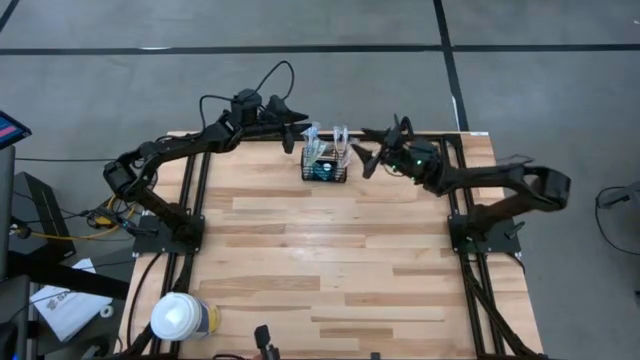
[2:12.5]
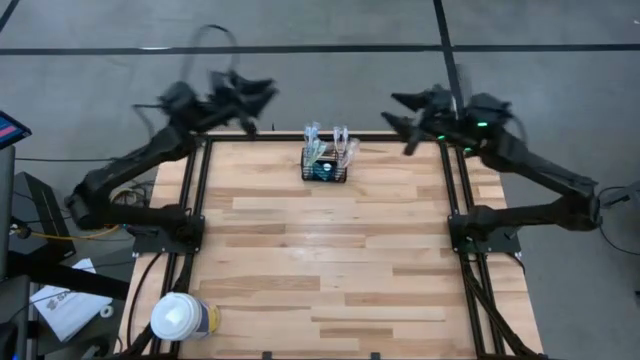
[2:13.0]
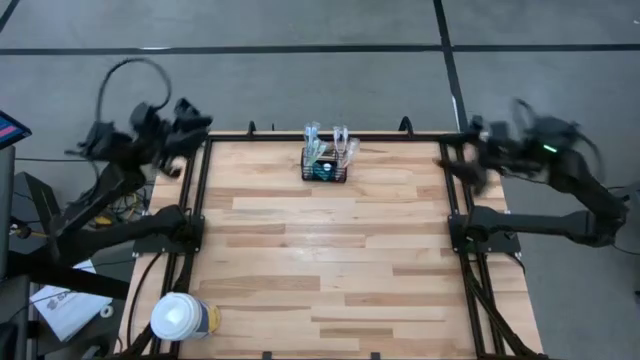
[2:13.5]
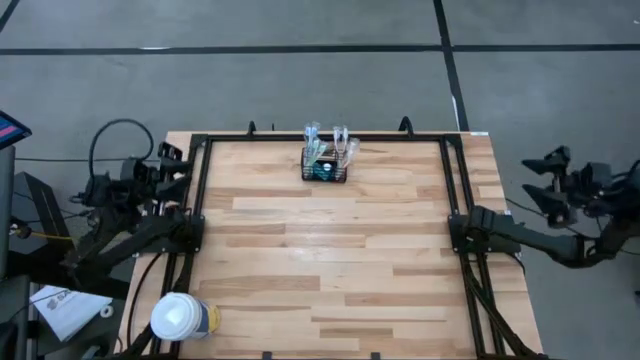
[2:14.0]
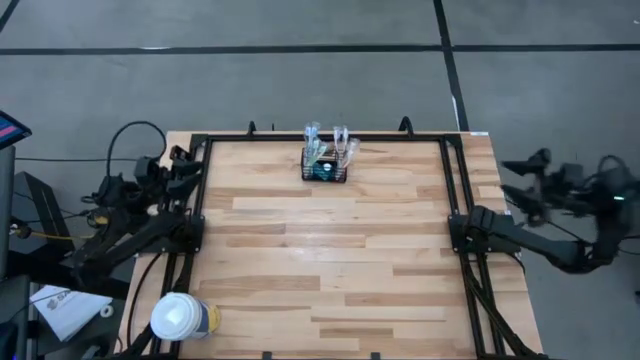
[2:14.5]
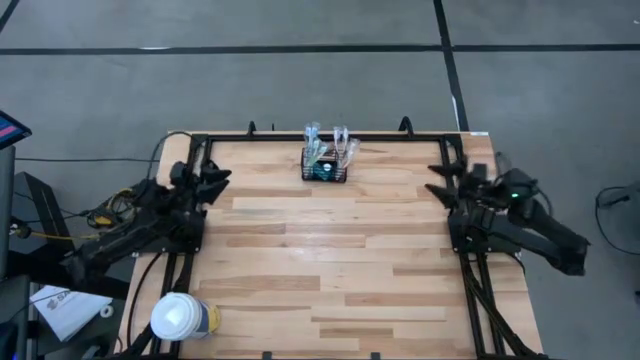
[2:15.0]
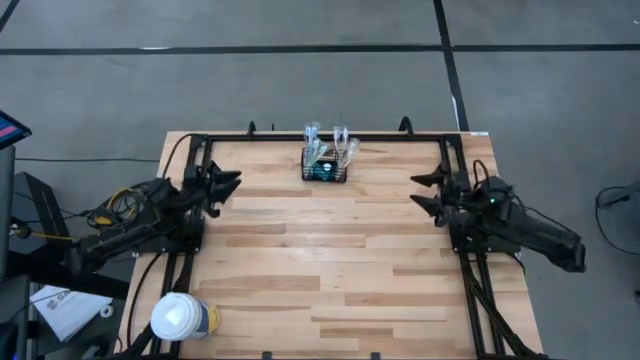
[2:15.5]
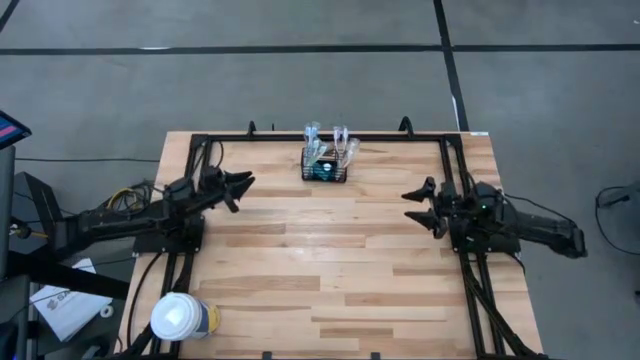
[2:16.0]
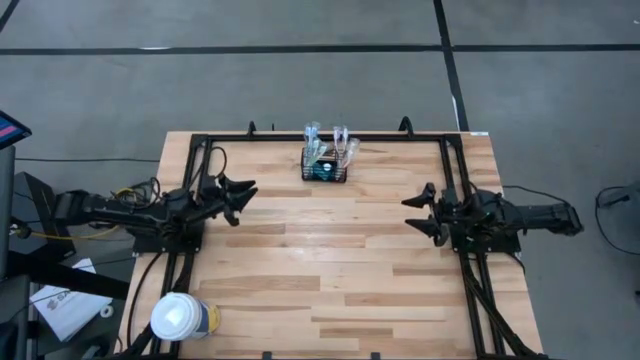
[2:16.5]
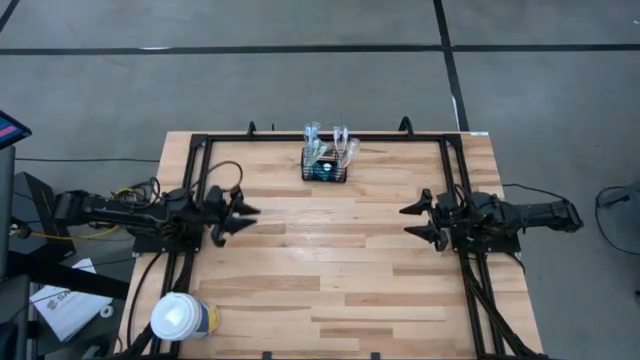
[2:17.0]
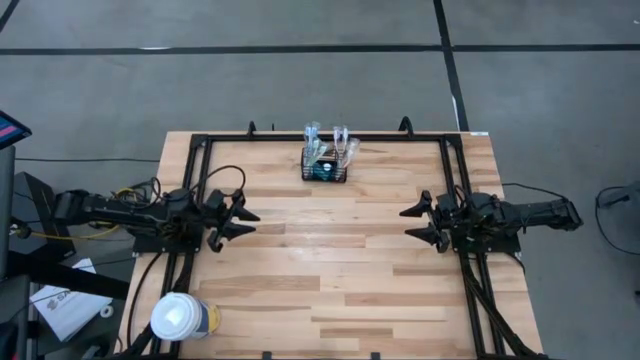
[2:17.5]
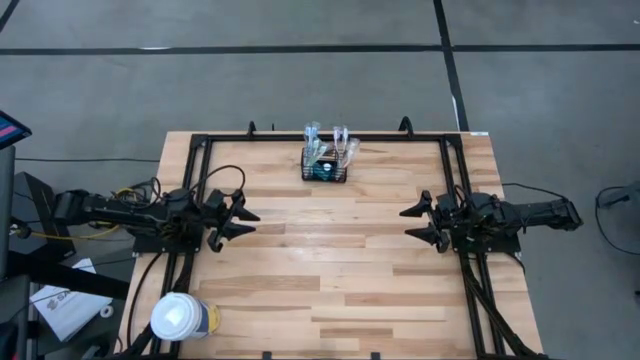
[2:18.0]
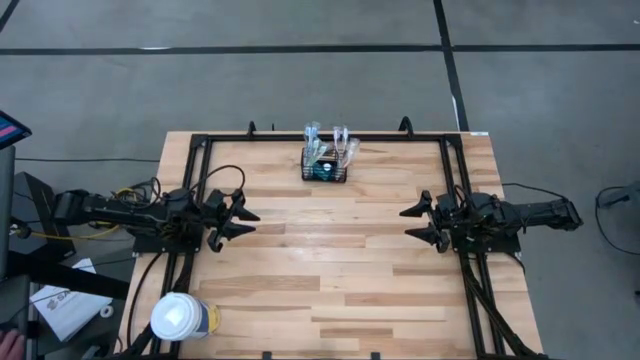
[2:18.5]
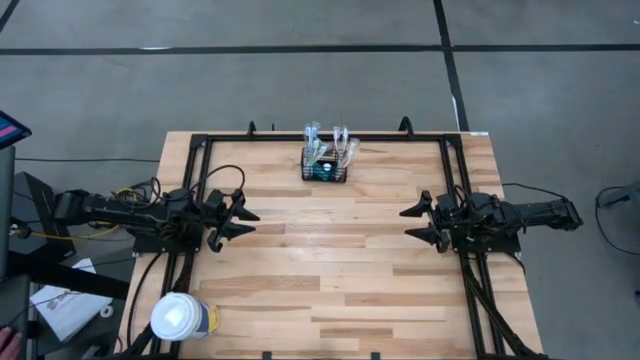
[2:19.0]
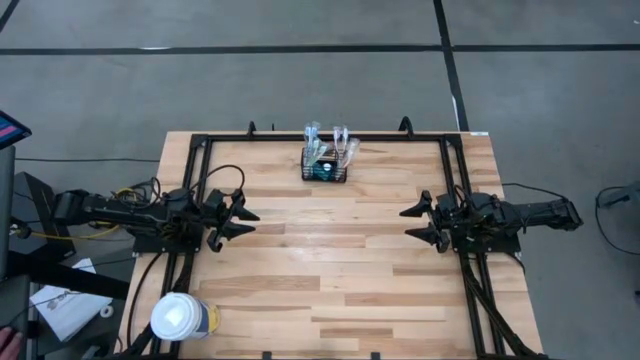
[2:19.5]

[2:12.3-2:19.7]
Task: Pick & Place toothbrushing station
Return to Home Position

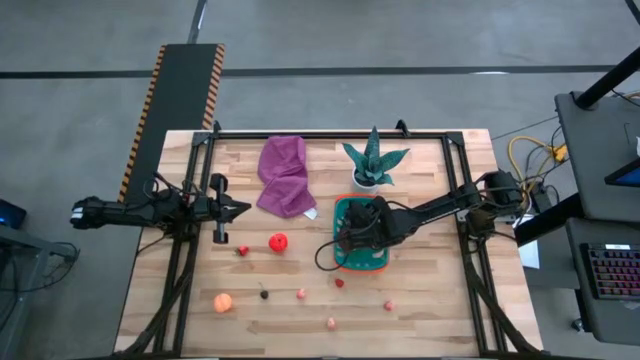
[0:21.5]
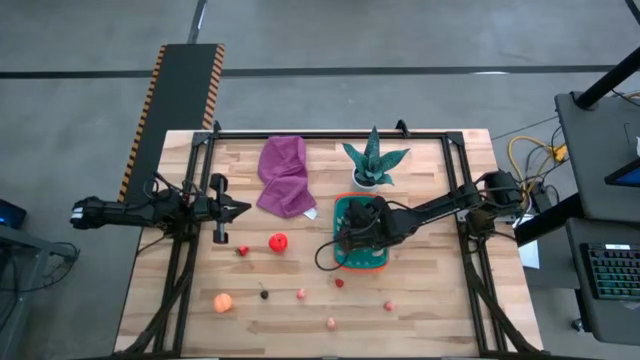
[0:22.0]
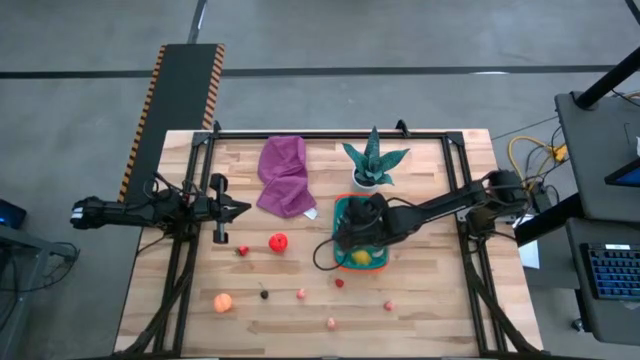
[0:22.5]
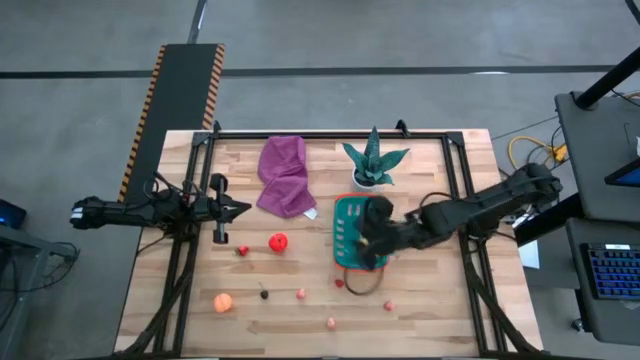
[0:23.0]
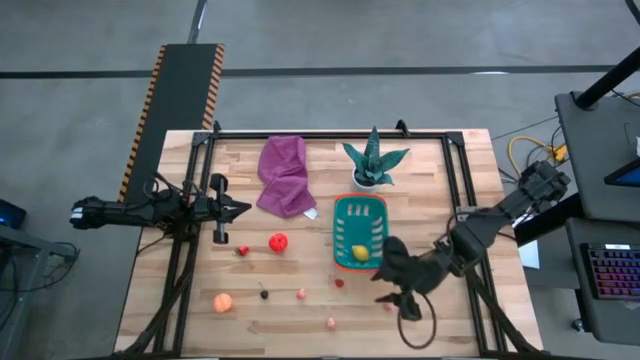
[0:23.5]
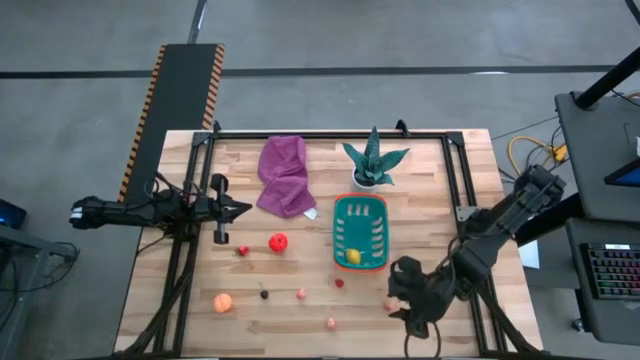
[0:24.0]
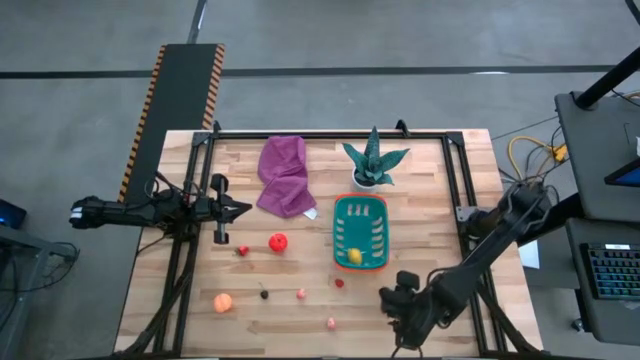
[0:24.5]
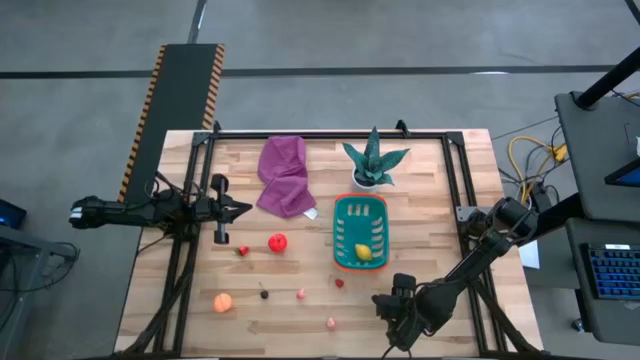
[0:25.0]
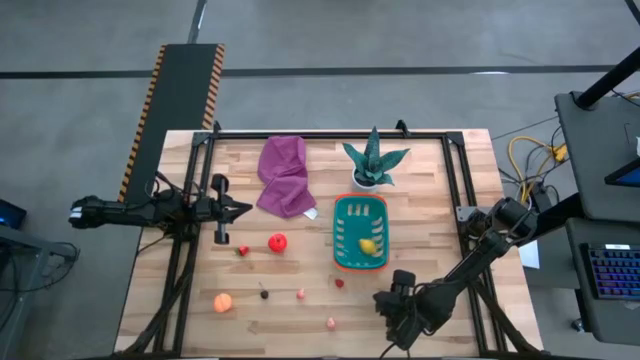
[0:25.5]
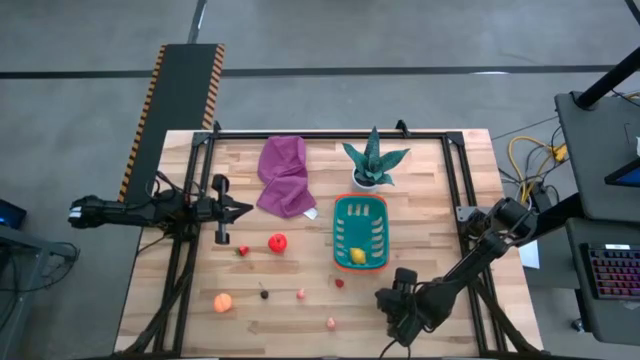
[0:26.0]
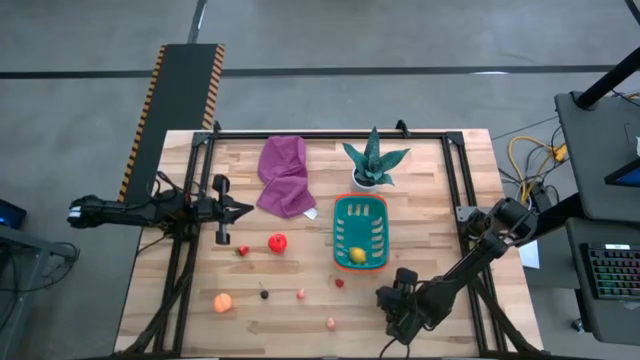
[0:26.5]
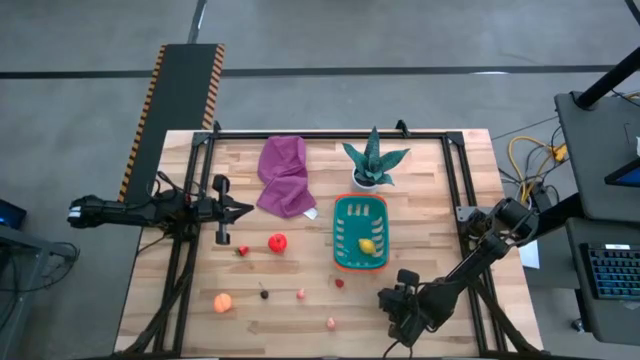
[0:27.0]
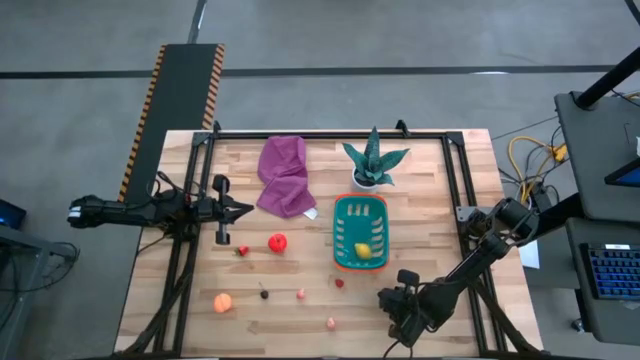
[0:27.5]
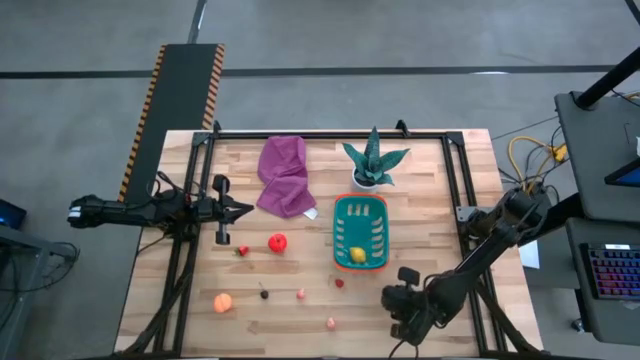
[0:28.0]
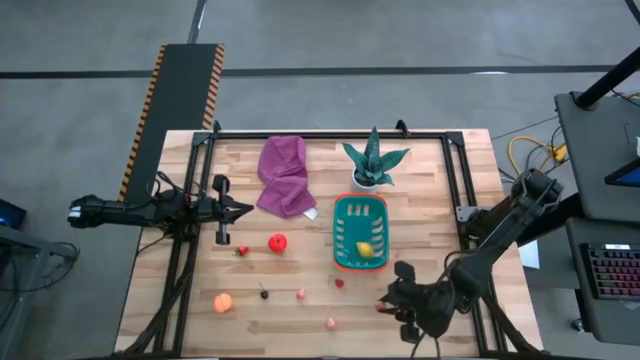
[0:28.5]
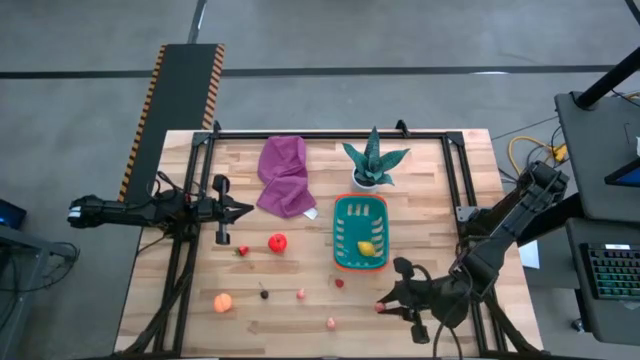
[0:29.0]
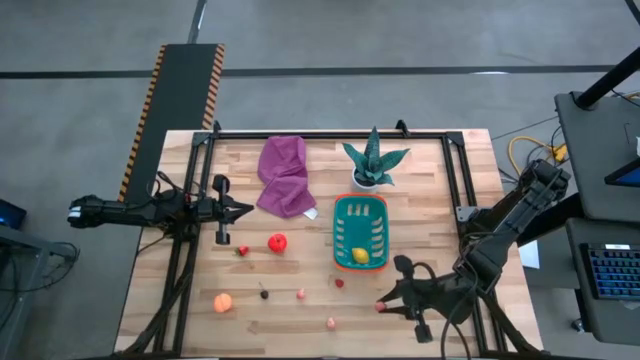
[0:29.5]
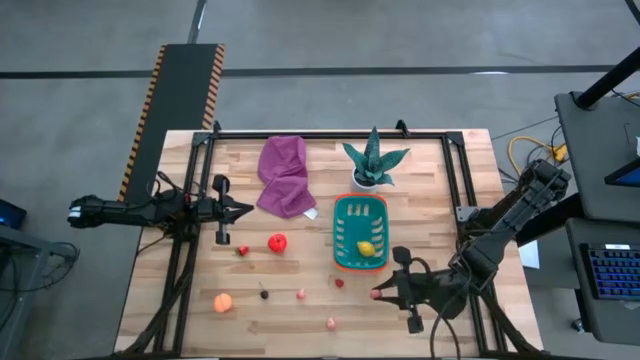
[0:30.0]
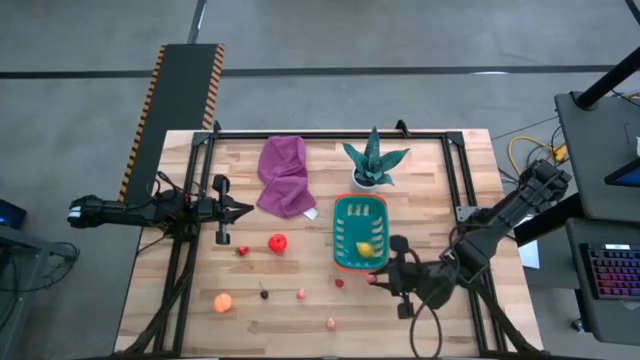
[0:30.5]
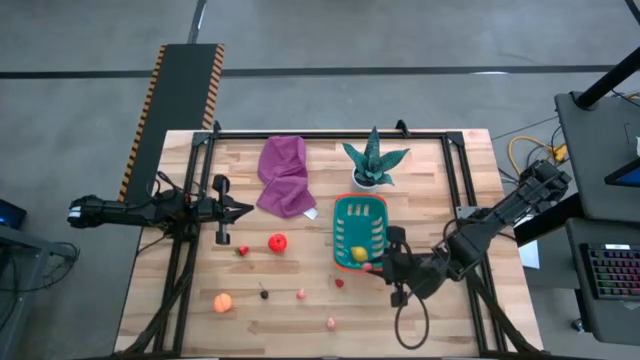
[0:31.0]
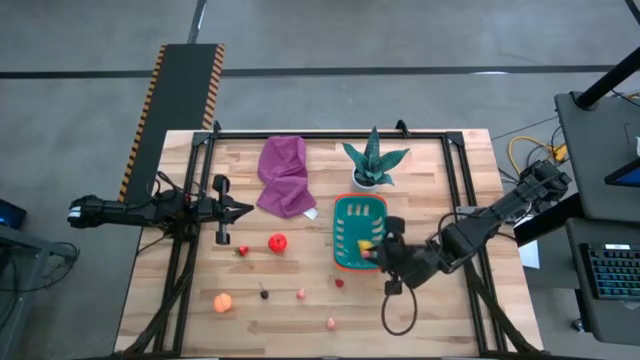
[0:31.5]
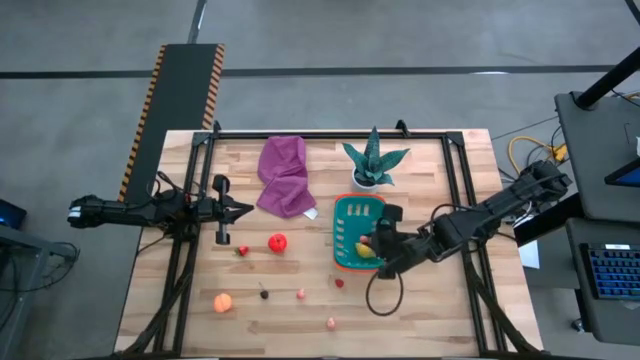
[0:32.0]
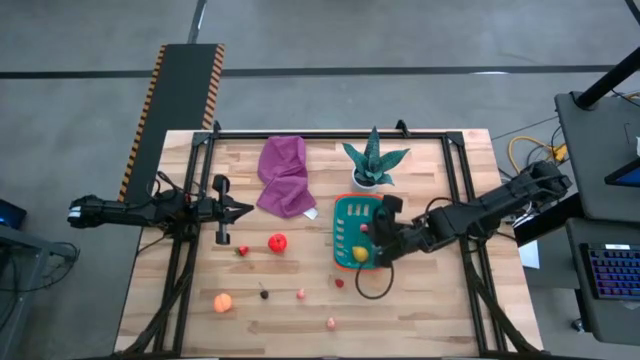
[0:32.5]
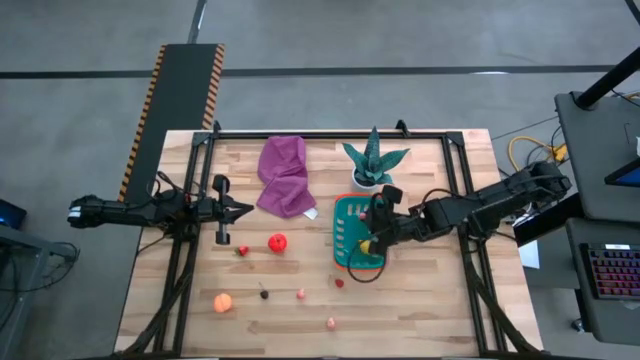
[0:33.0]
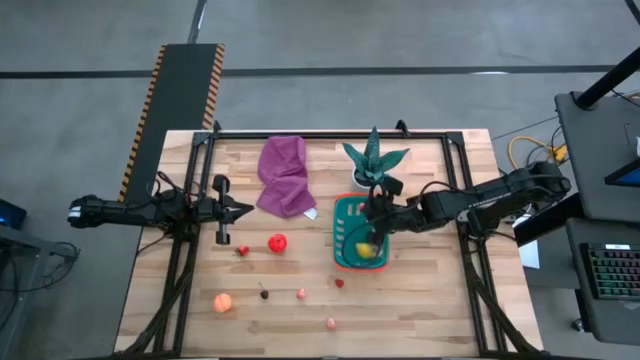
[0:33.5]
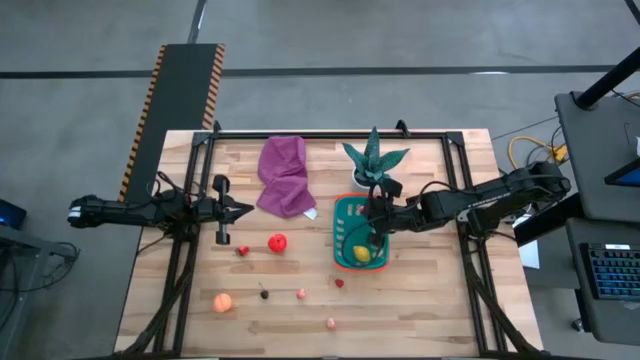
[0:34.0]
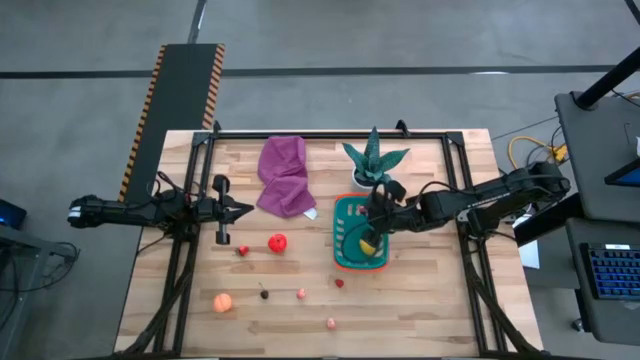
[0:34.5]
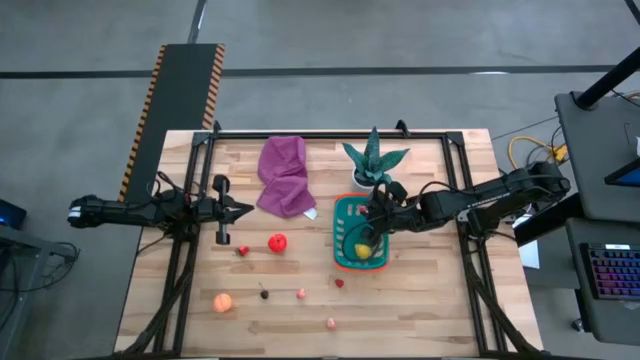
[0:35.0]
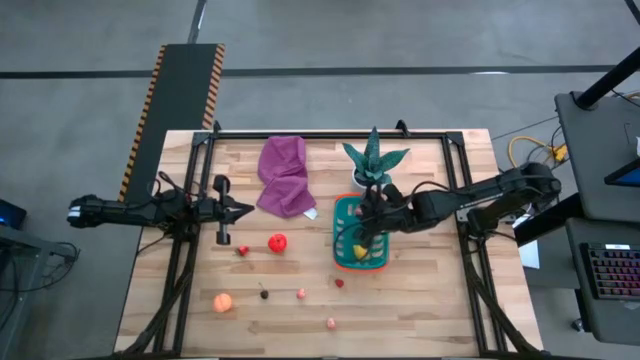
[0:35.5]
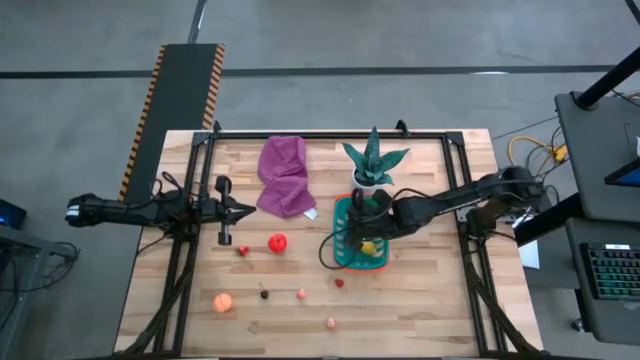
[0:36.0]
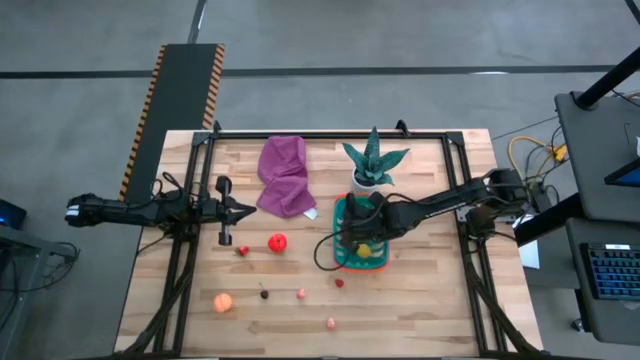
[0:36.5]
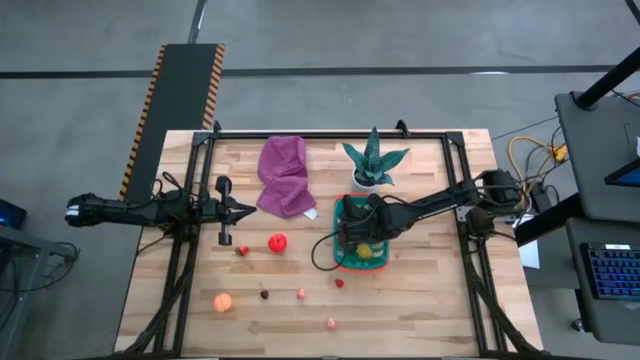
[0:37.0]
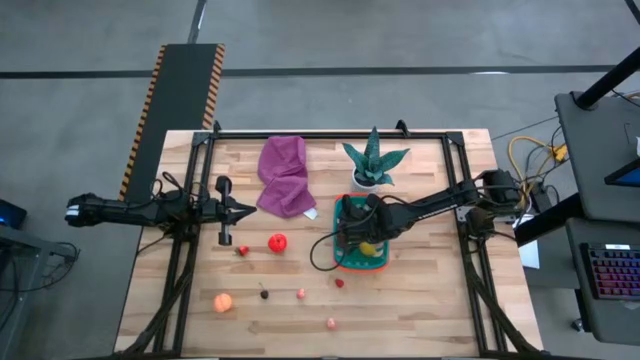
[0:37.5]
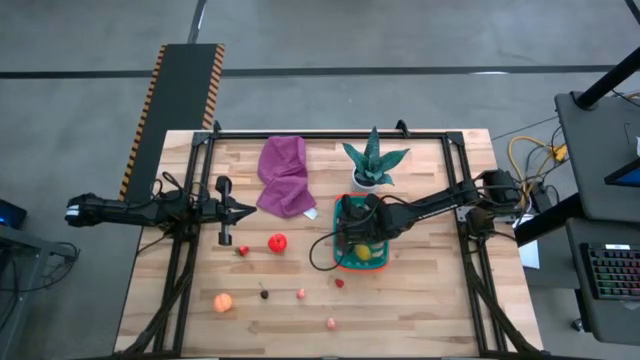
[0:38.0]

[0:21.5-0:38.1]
Task: Pick and placing Produce into tupperware
Put the top right pink peach into the blue basket
